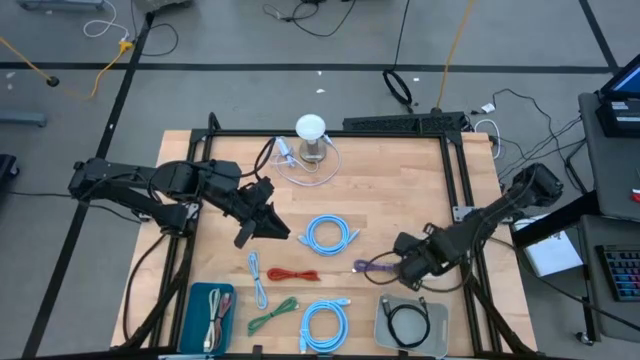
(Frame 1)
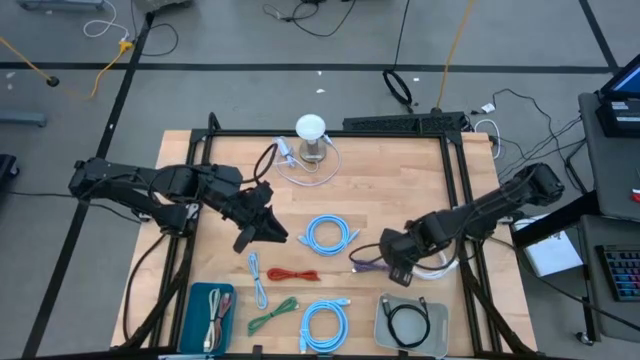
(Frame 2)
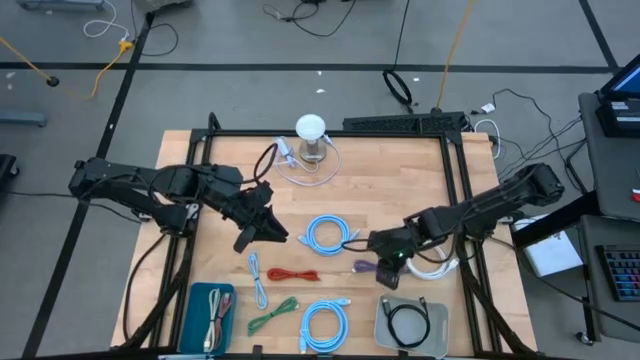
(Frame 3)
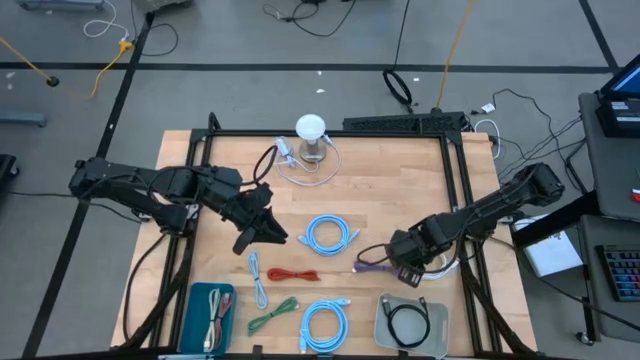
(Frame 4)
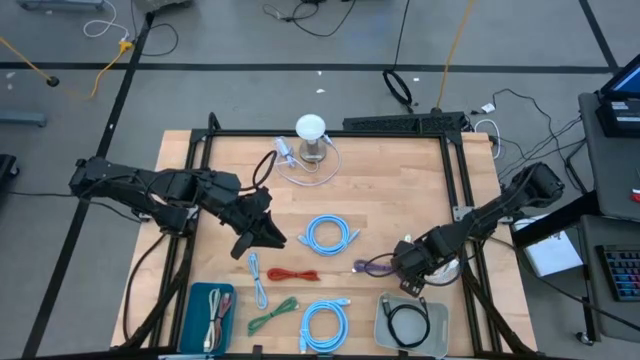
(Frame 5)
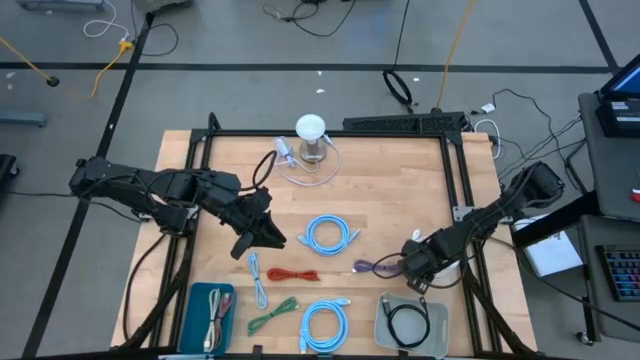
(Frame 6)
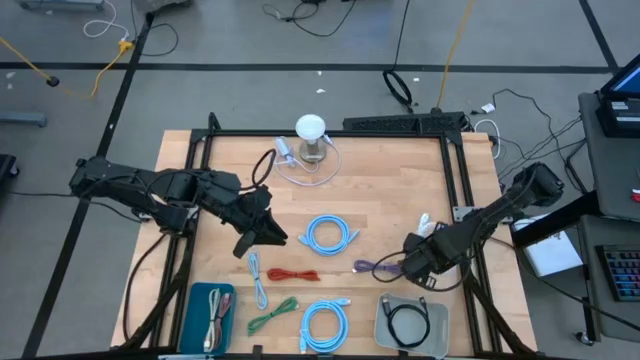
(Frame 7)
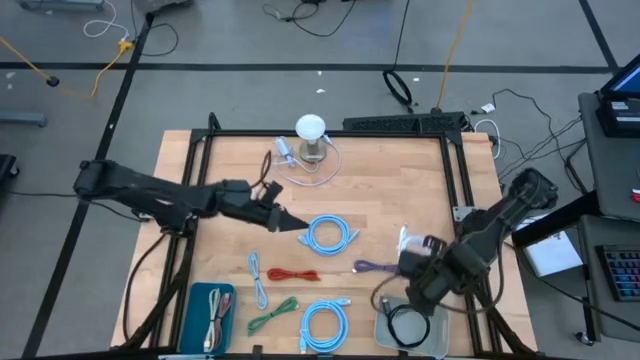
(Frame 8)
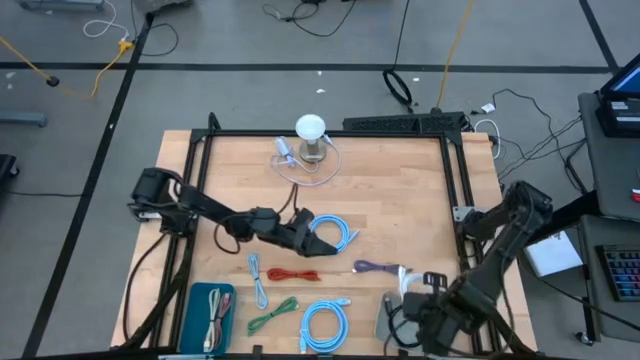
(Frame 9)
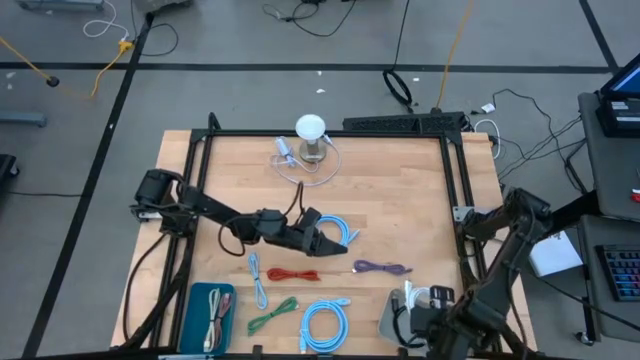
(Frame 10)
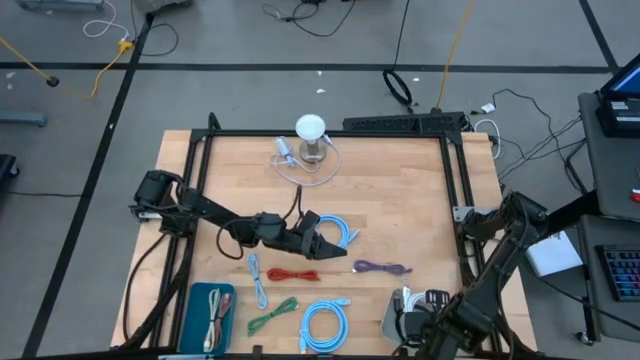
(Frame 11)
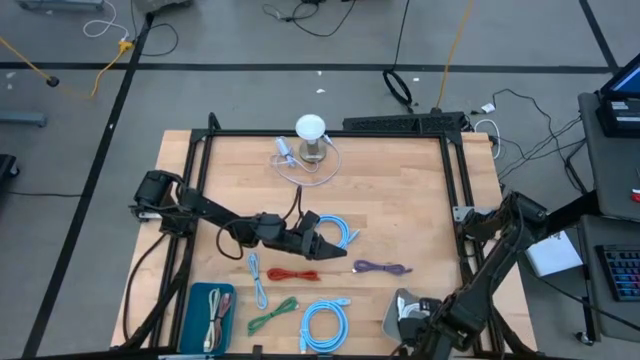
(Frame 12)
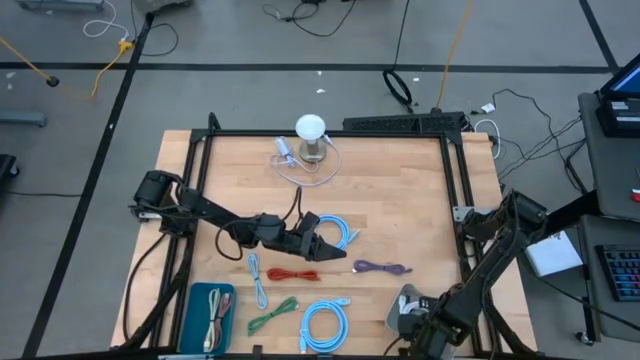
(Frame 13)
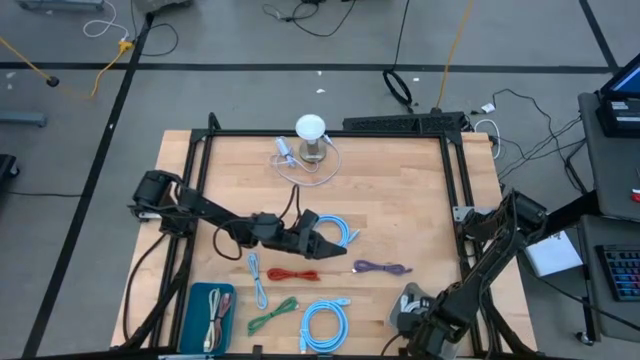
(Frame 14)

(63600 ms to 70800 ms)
Task: Pick & Place USB Port
Put the white video cable into the gray bin

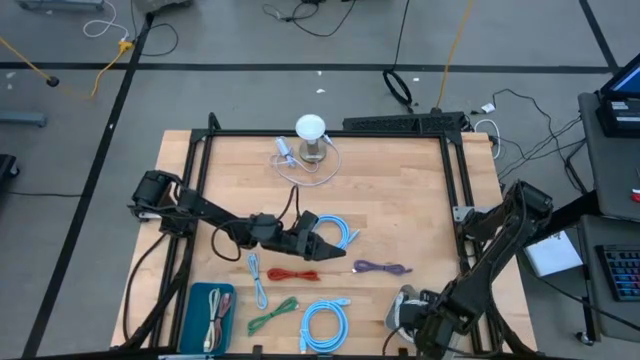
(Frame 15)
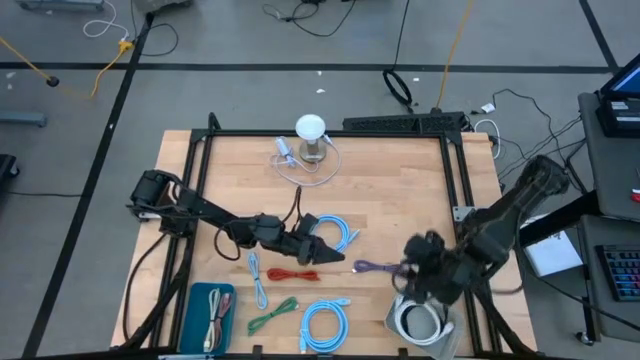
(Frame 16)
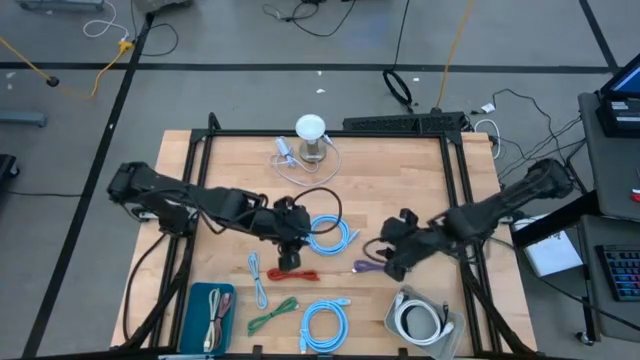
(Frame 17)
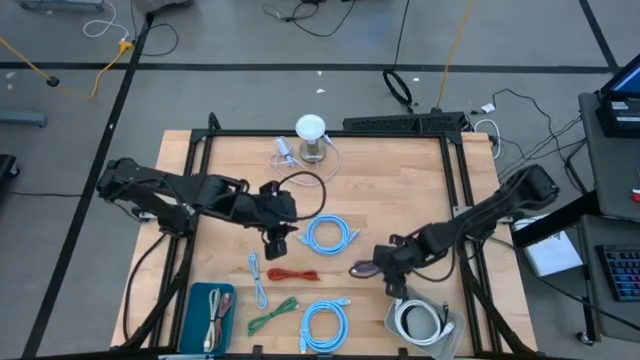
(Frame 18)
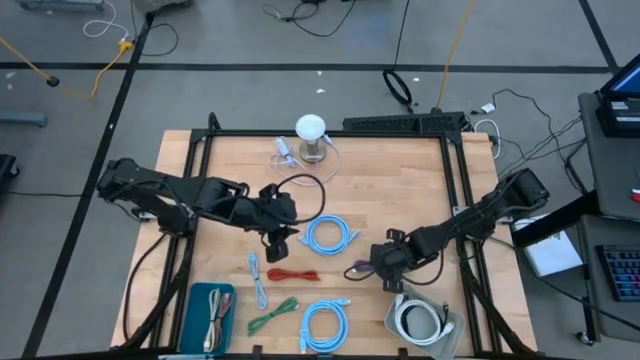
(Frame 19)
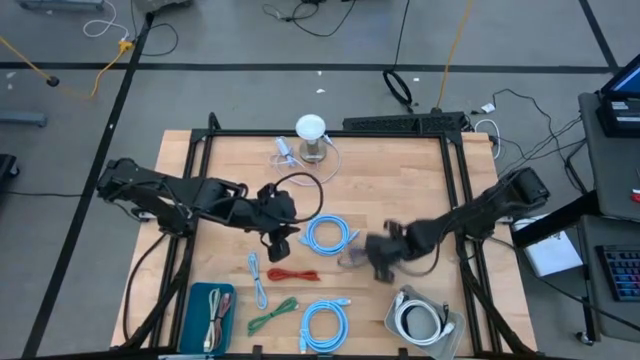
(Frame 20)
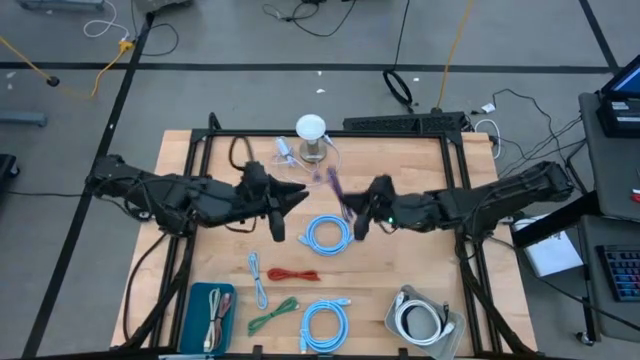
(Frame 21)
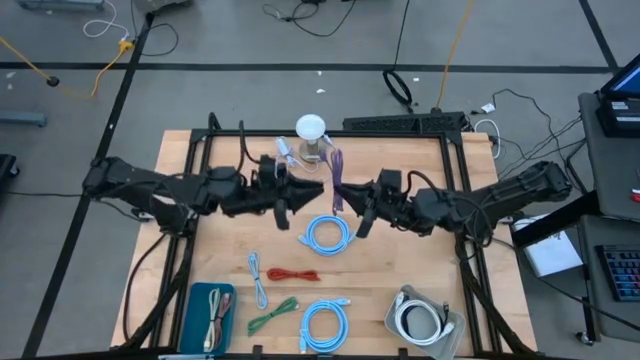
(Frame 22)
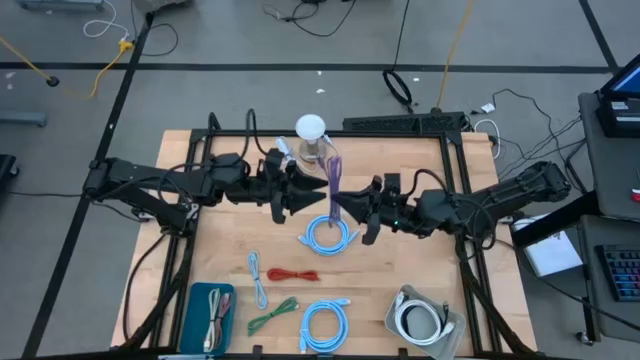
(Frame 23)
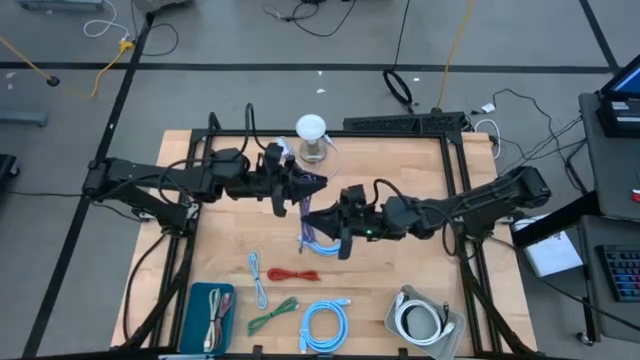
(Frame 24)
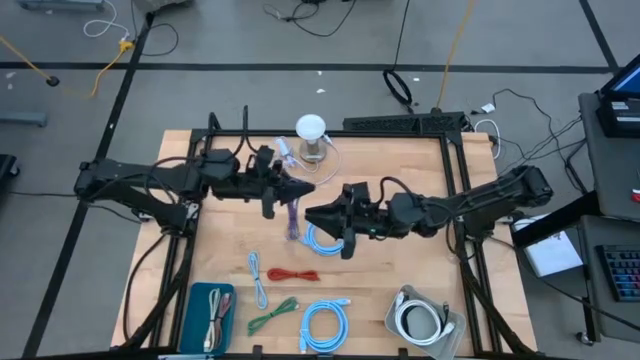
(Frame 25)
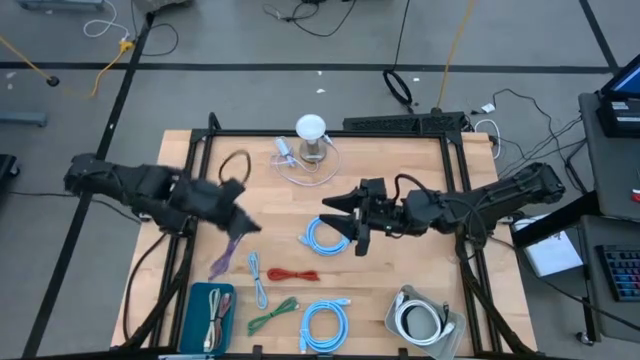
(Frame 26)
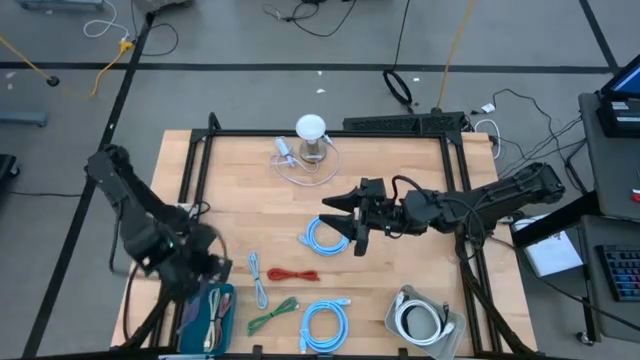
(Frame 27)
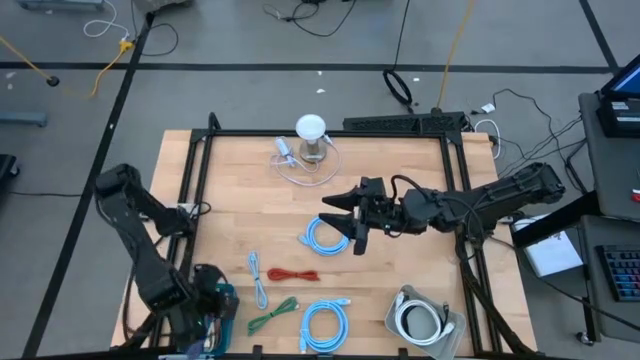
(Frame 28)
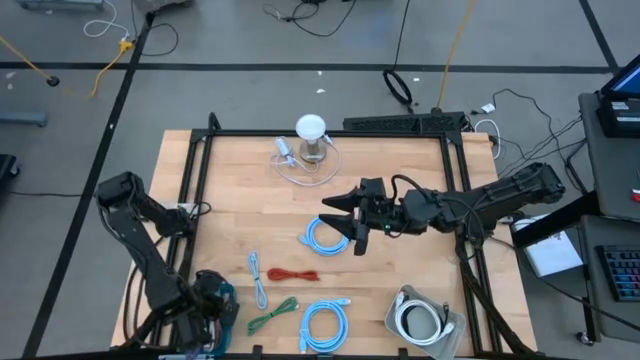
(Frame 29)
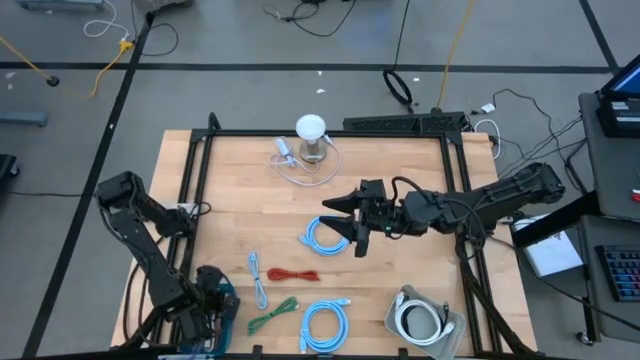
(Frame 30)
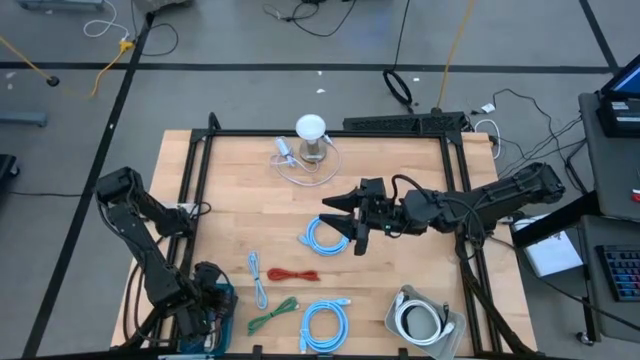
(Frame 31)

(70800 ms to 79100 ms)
Put the purple charger cable into the blue bin

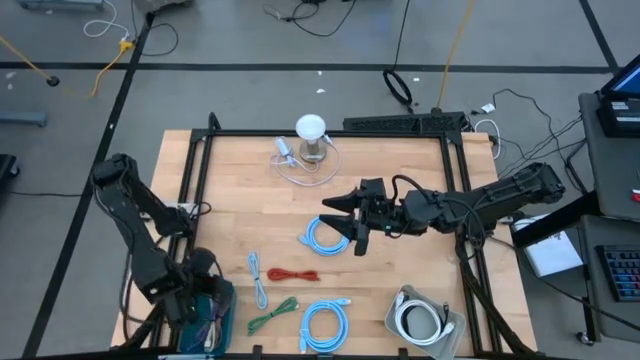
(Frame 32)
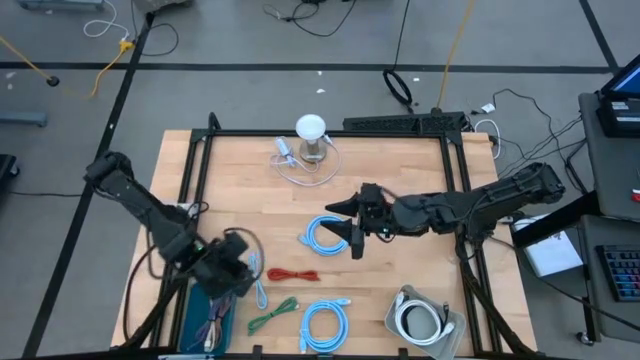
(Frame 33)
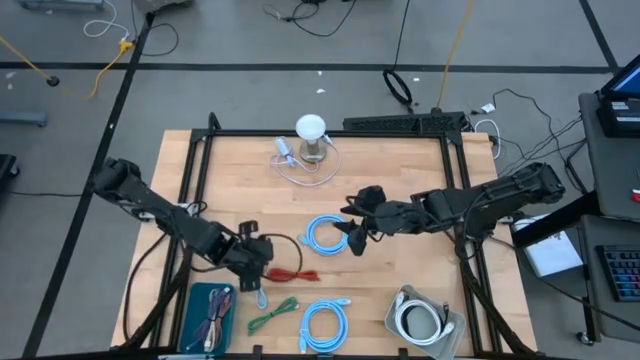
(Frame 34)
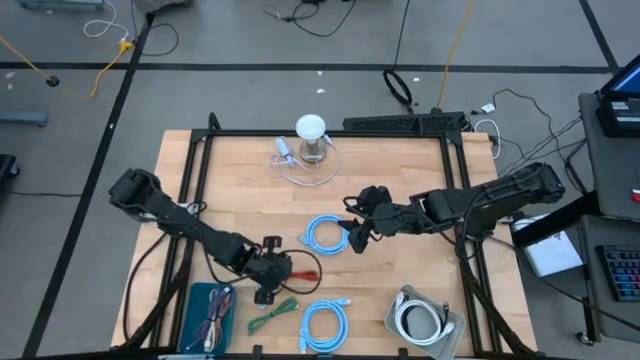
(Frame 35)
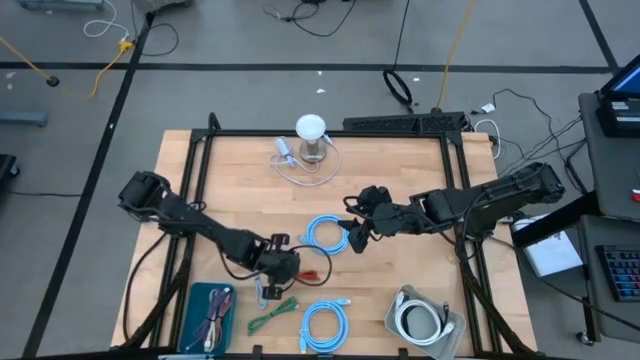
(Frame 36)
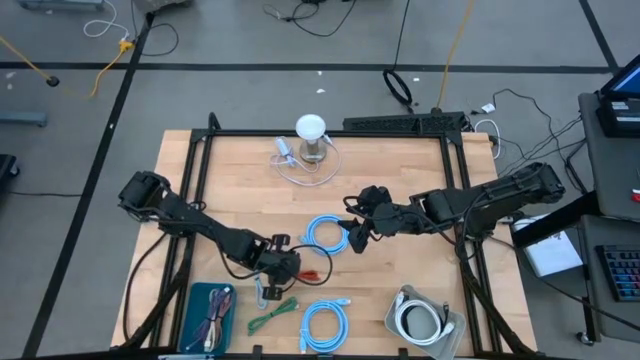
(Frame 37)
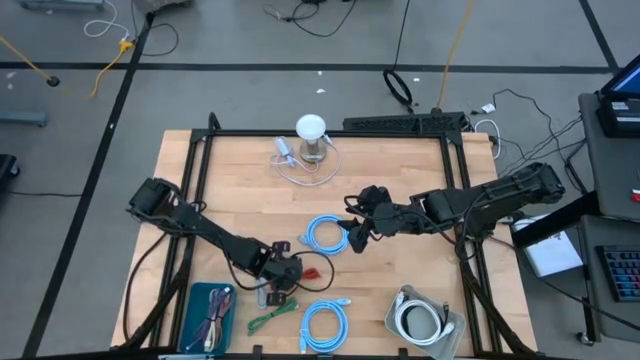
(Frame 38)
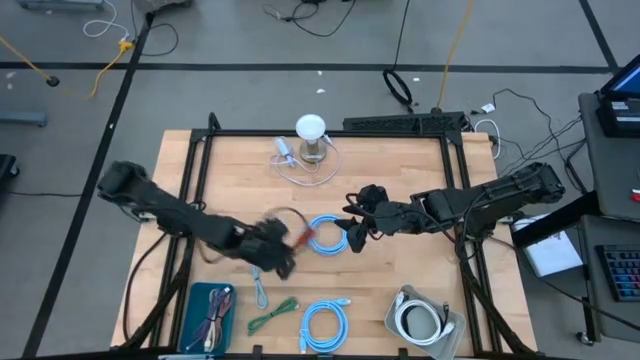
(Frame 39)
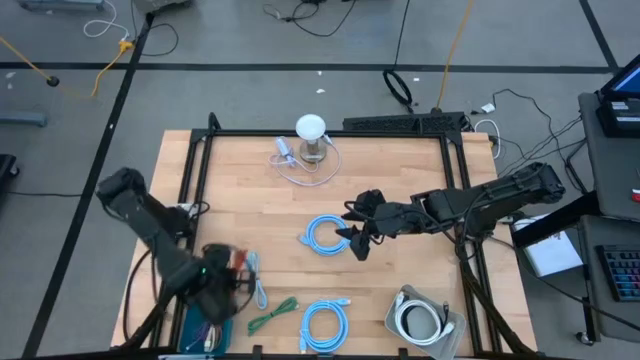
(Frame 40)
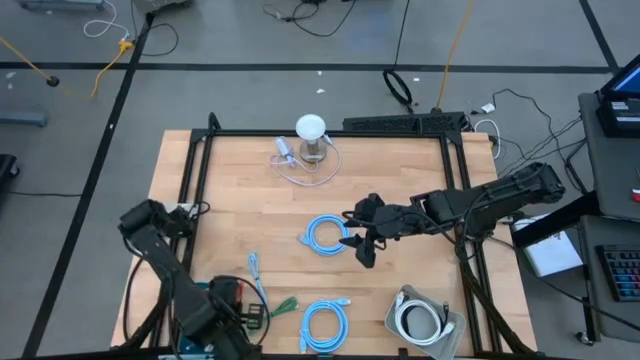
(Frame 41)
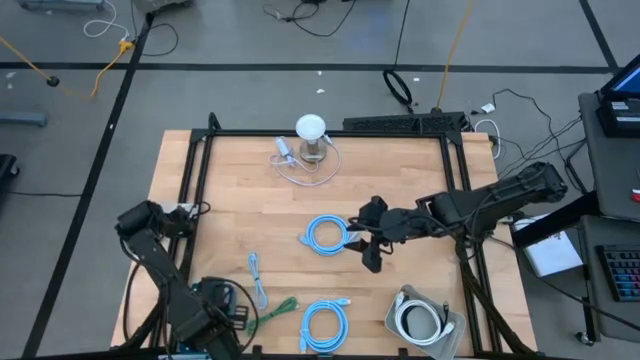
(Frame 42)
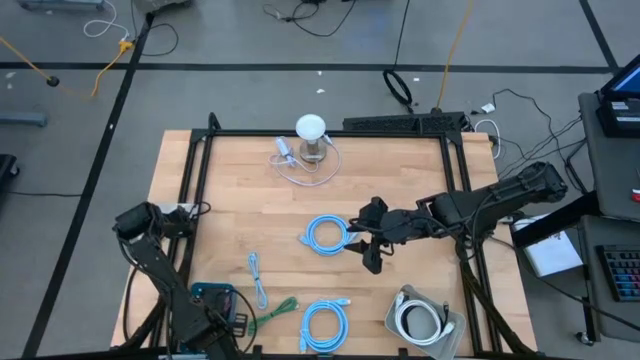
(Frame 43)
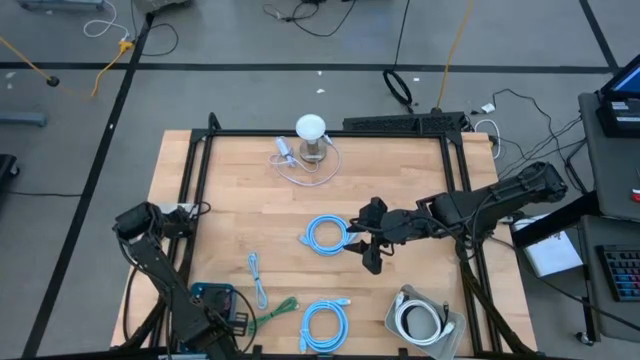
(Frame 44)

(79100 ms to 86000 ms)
Put the red charger cable into the blue bin
